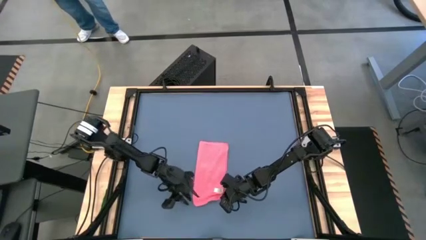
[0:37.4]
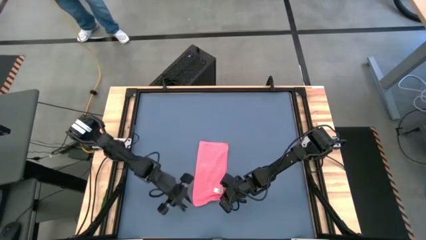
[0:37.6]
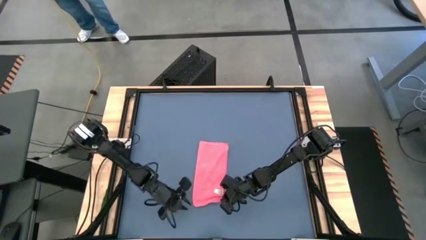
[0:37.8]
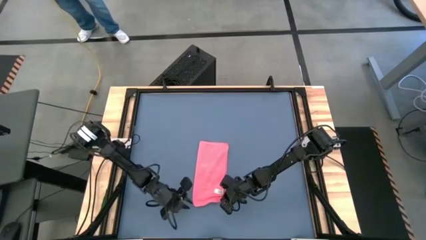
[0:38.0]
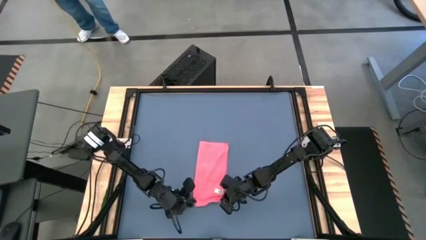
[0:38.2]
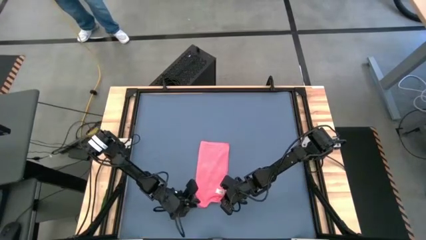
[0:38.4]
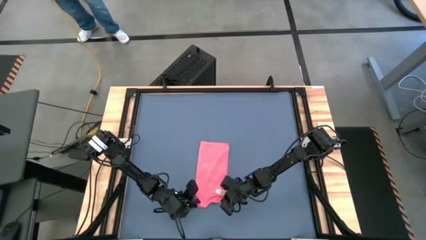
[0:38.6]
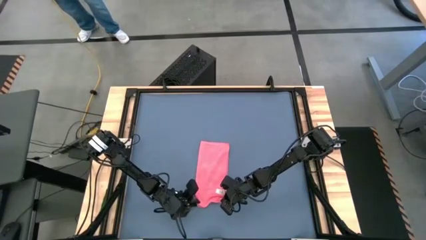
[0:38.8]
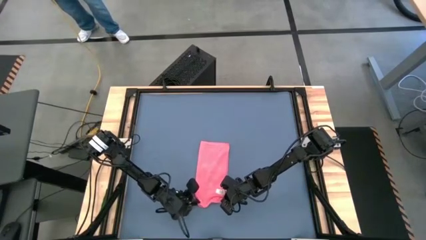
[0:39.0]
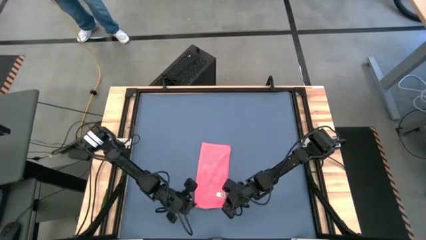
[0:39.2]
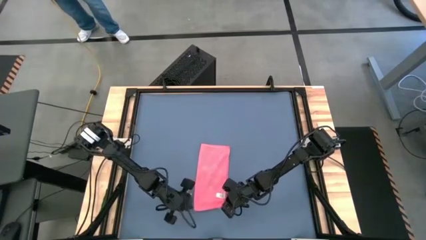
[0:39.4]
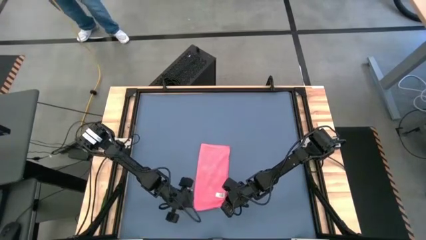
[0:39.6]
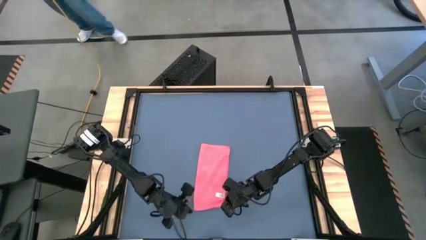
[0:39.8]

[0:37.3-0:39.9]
Task: Roll towel into tight, uniform cylinder
Roll the red towel

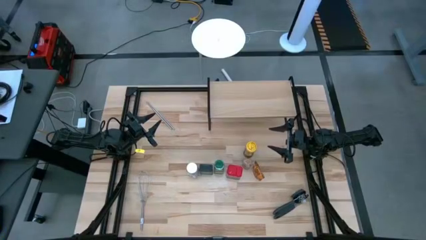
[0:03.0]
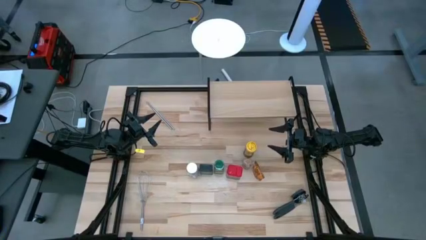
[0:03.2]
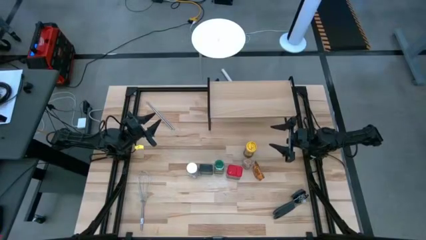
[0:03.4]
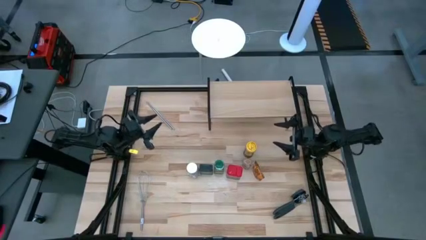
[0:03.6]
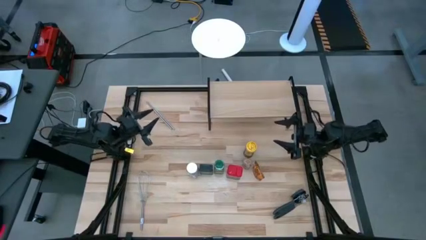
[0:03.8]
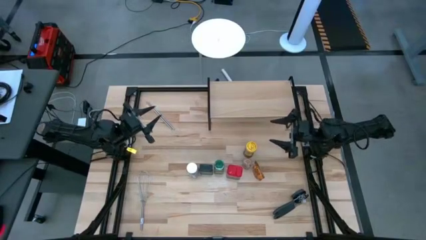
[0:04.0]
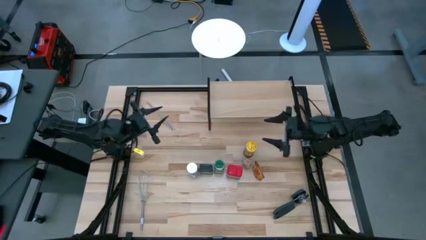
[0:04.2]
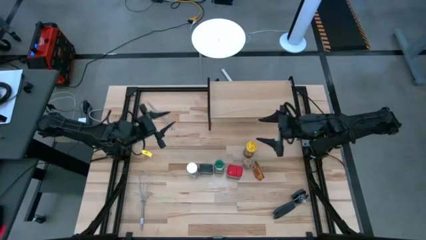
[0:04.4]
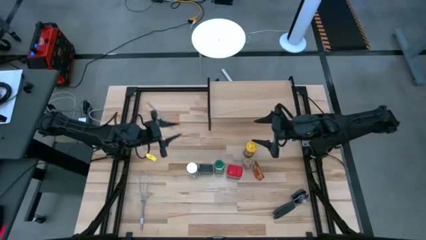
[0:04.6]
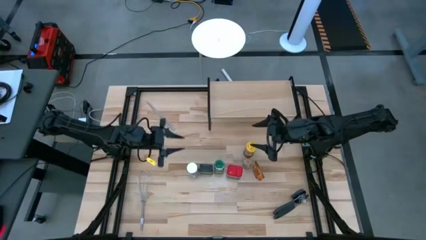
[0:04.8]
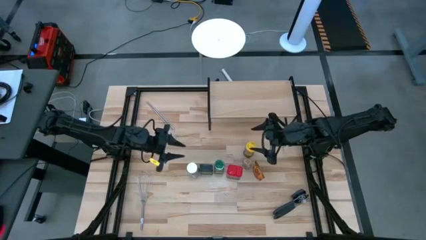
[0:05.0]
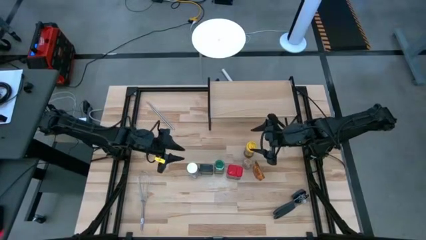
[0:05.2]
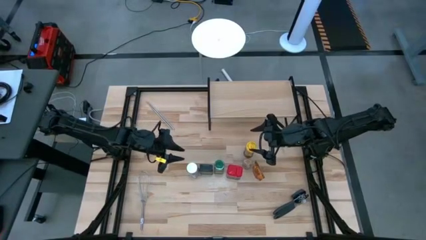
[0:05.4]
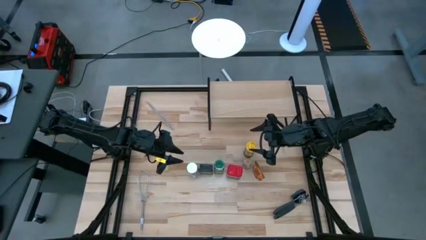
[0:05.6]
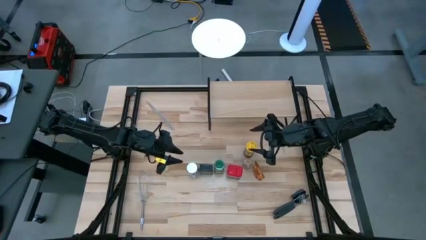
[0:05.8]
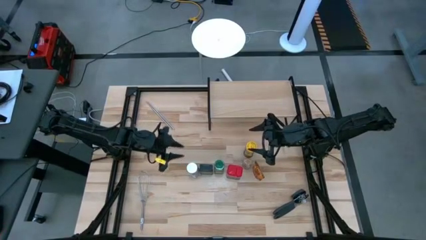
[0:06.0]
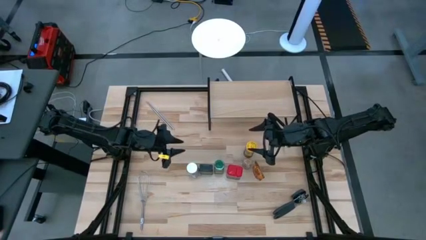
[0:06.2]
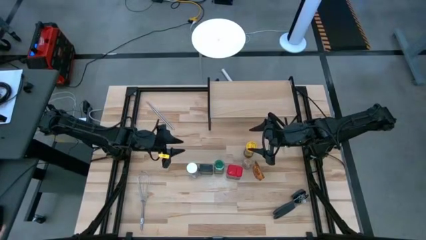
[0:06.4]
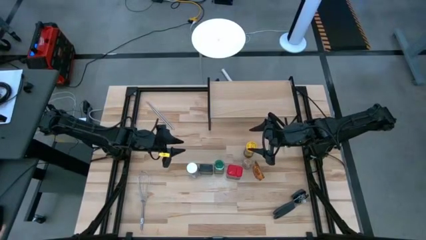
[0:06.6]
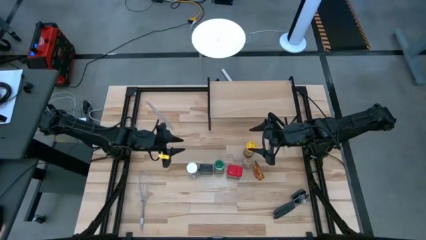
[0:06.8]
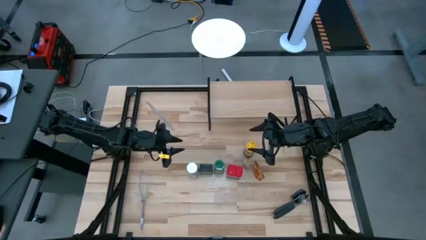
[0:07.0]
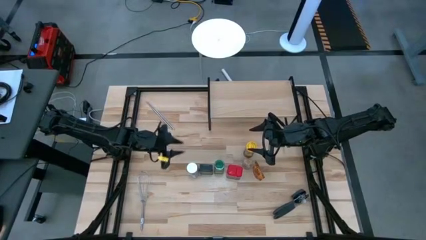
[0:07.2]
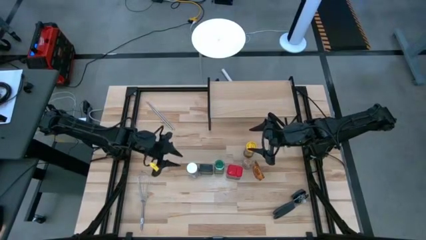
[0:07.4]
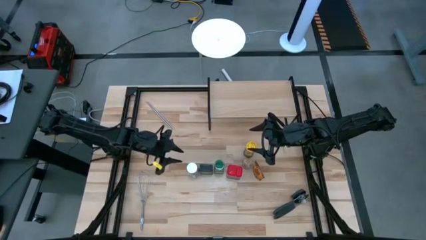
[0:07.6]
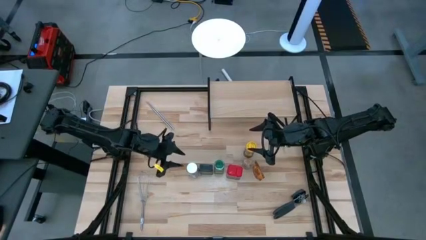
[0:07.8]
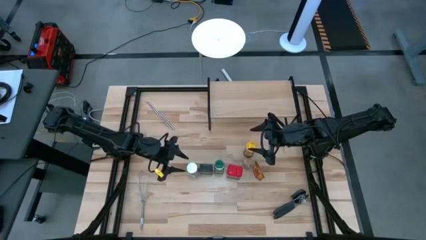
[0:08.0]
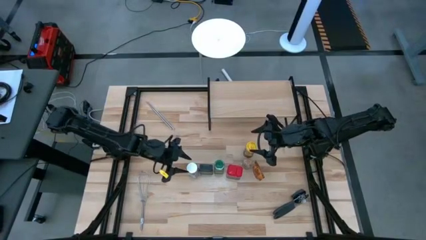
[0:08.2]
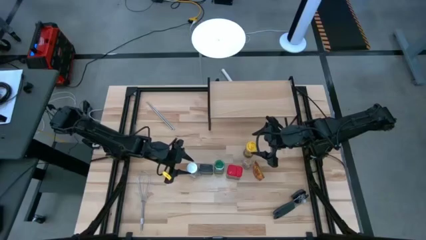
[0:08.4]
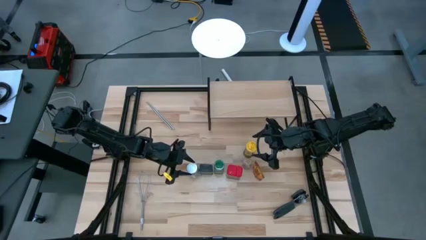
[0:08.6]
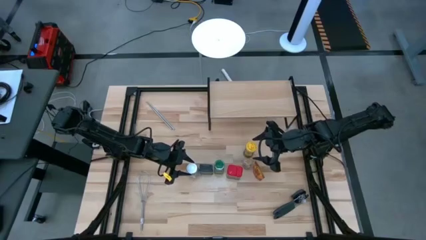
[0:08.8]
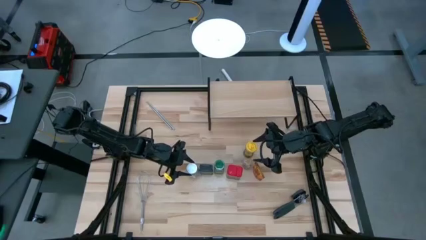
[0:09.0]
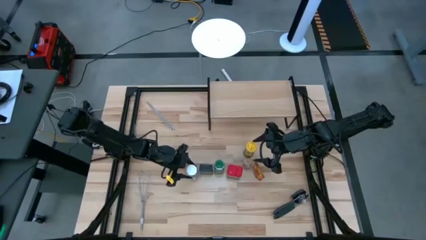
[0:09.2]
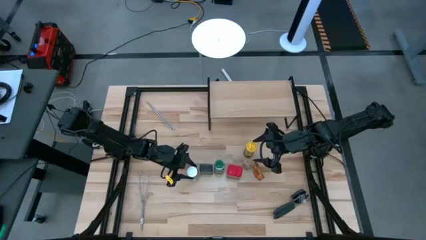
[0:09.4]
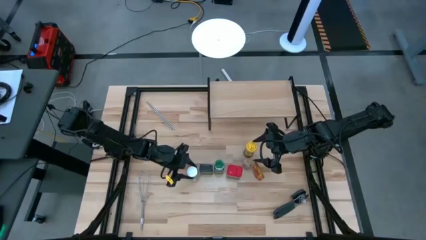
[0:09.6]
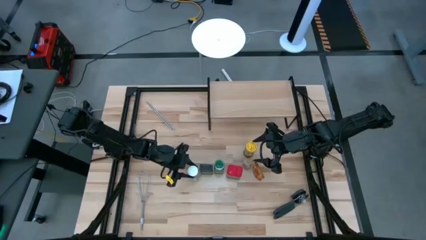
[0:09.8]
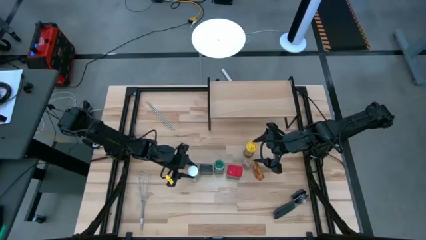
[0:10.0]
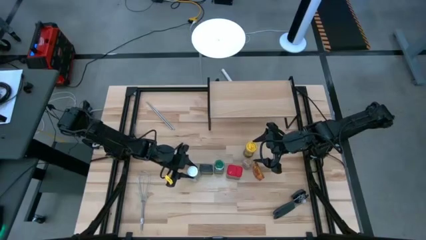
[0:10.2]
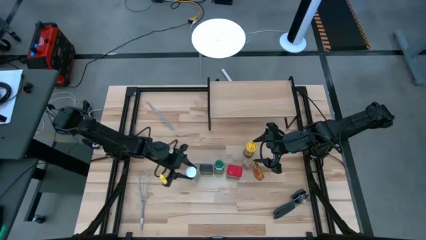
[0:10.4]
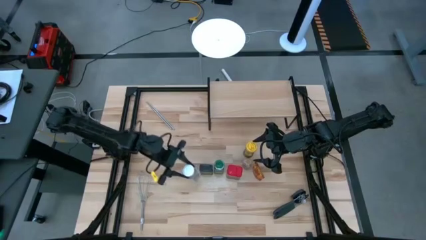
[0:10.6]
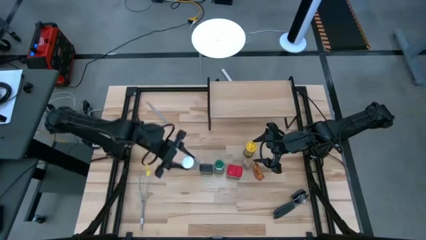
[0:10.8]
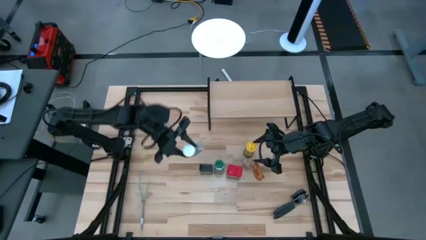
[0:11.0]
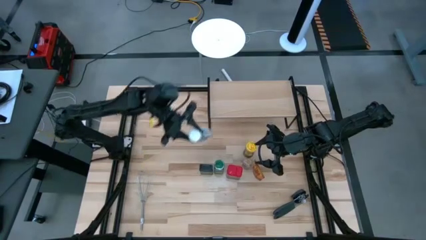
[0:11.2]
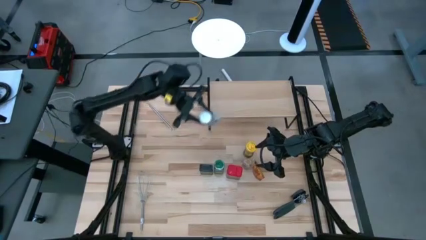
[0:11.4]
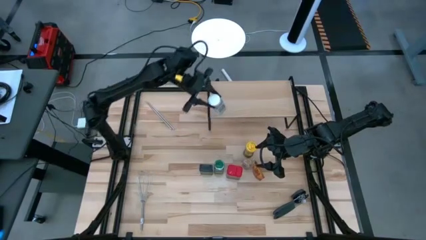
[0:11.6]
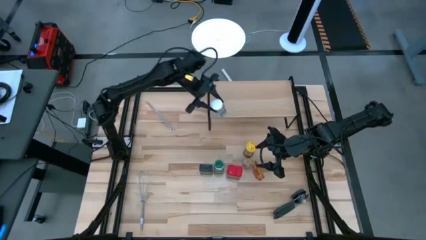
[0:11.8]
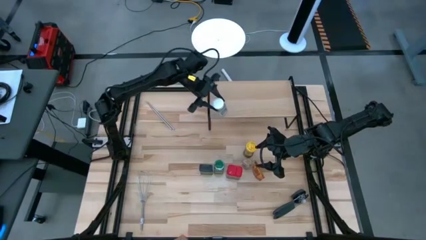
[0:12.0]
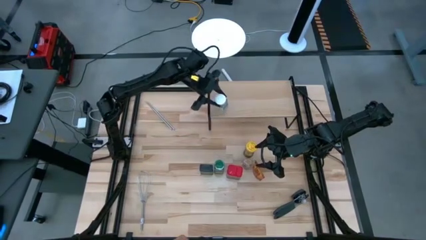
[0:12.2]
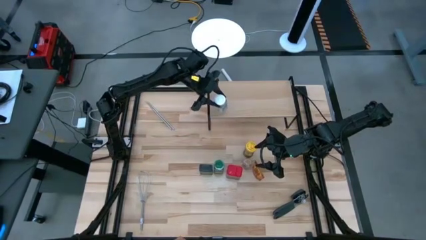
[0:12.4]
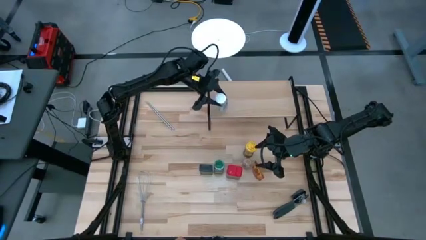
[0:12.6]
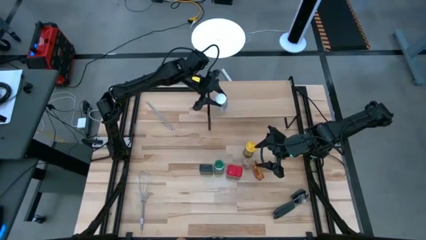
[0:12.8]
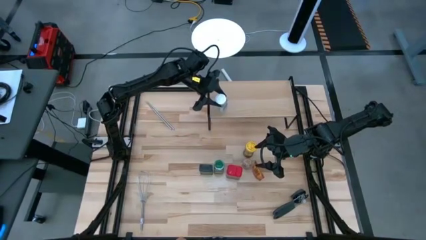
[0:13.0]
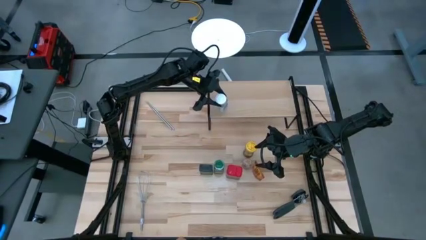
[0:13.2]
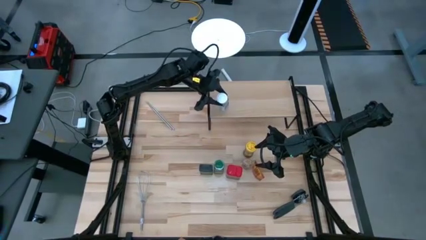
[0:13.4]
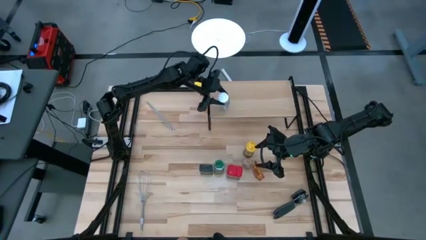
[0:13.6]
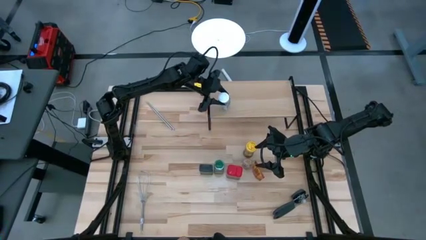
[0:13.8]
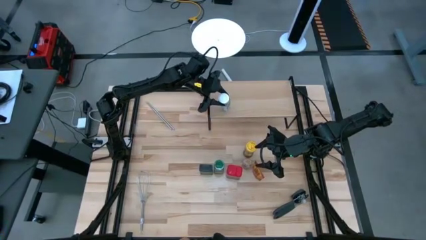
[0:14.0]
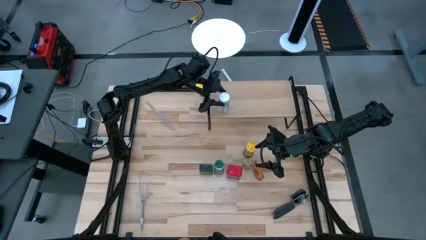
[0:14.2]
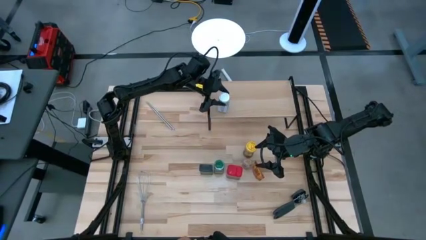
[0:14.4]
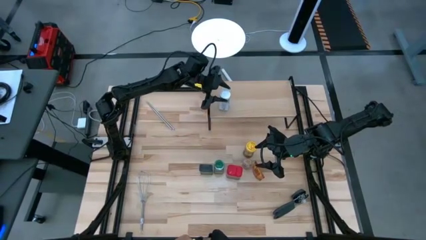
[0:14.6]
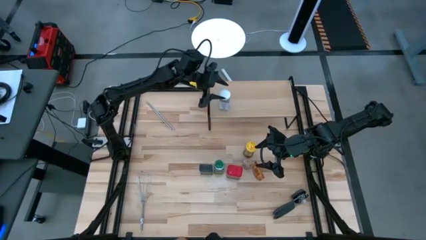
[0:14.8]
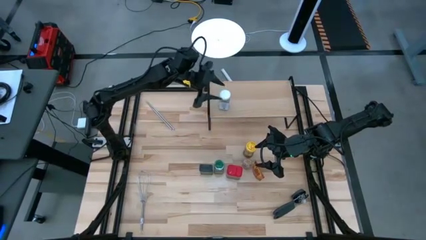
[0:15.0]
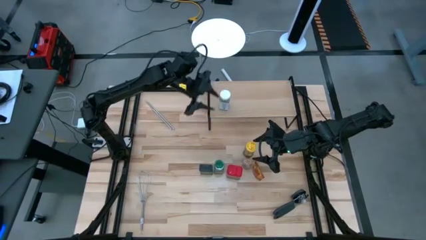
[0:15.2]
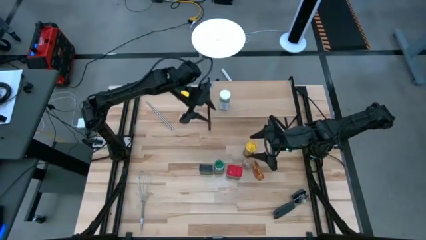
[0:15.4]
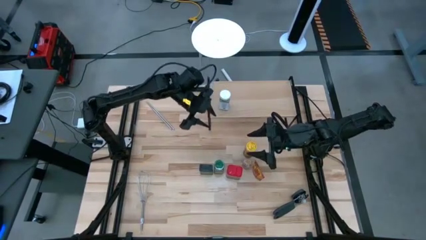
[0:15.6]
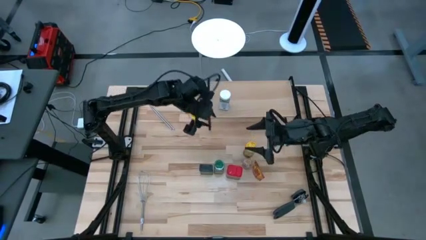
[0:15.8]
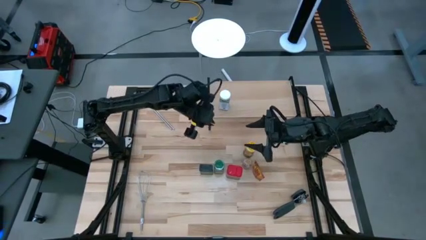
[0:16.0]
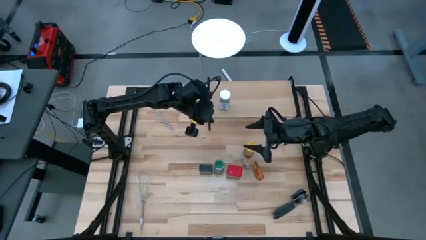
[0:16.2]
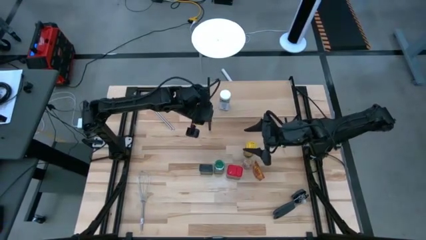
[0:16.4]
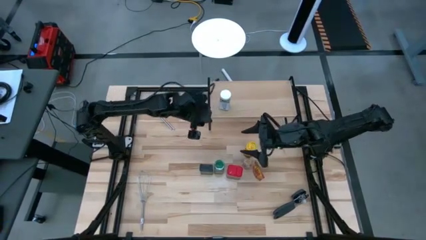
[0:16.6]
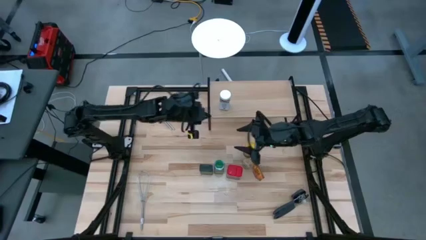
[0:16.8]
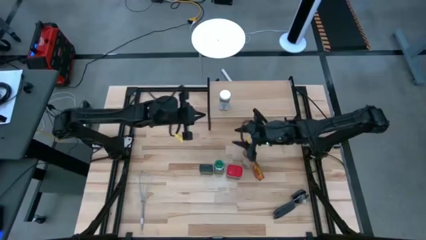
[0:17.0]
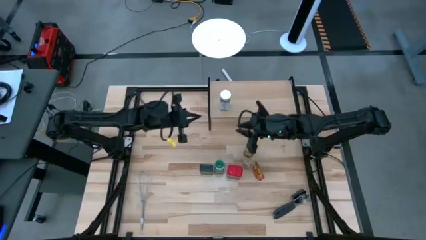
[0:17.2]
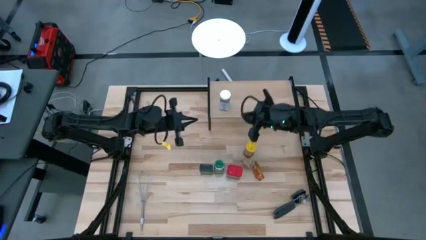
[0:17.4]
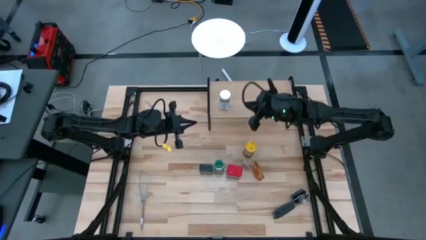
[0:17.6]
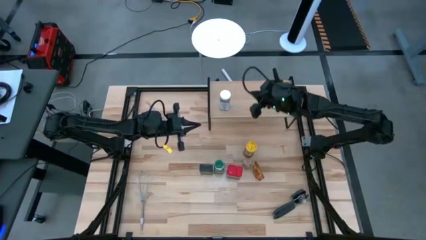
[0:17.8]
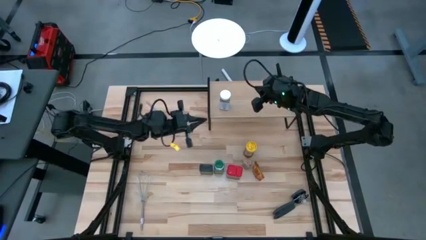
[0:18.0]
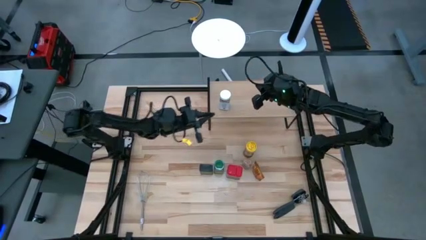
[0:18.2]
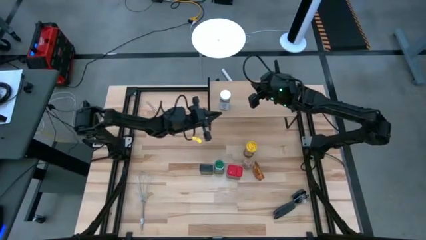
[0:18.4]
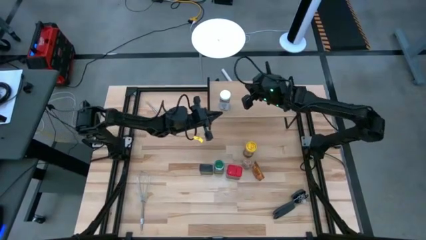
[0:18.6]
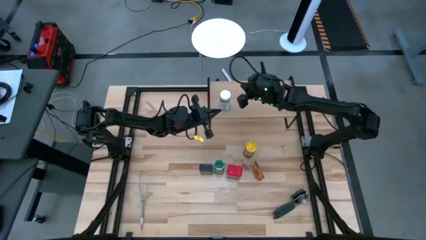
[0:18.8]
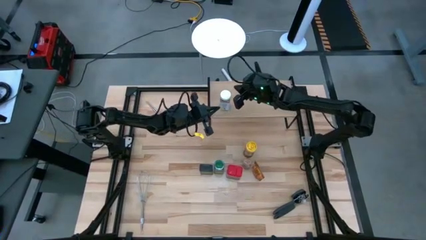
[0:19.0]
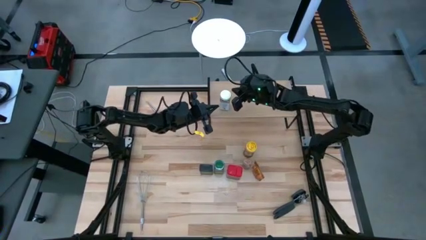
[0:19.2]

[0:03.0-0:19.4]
Task: Shelf spices
Put the white seasoning bottle on the shelf
